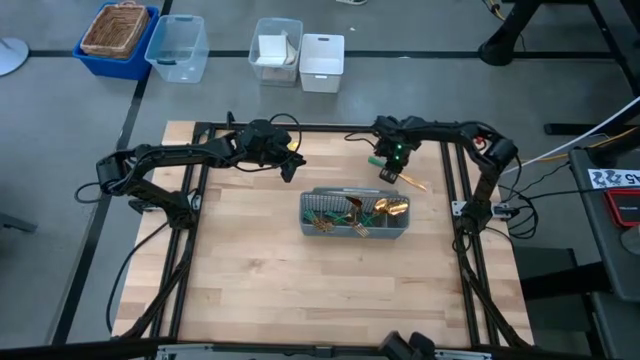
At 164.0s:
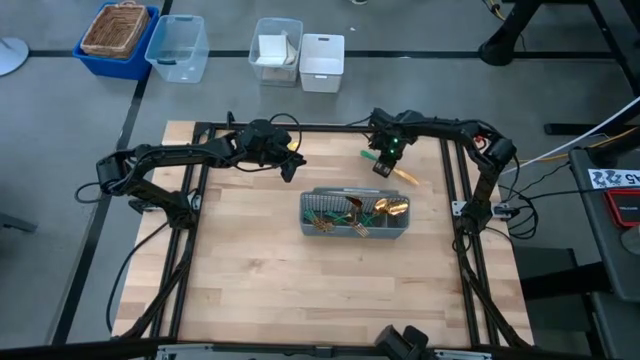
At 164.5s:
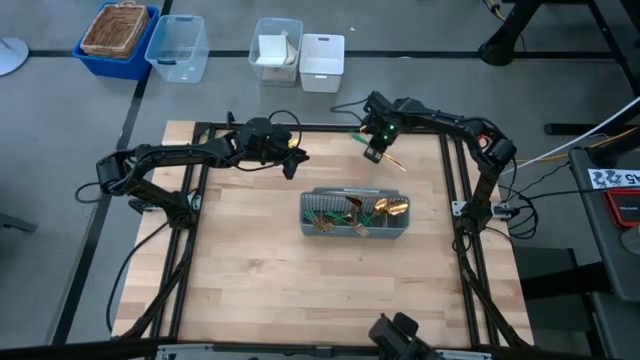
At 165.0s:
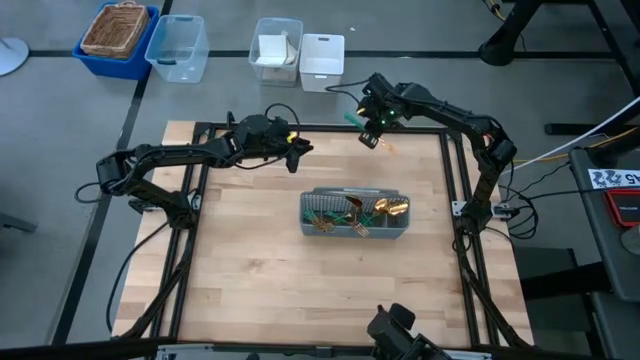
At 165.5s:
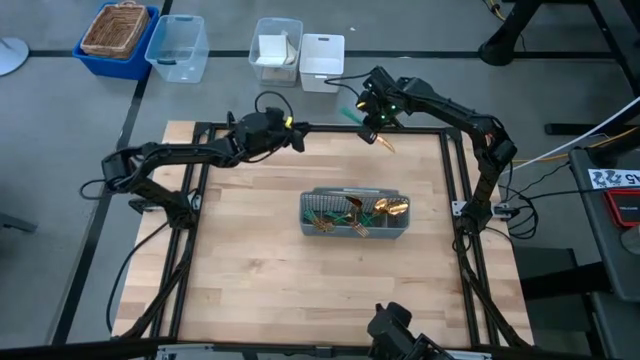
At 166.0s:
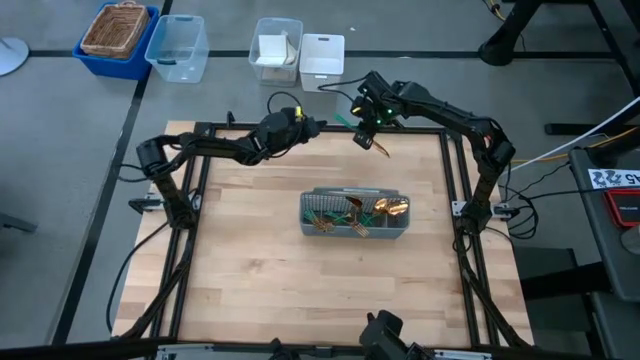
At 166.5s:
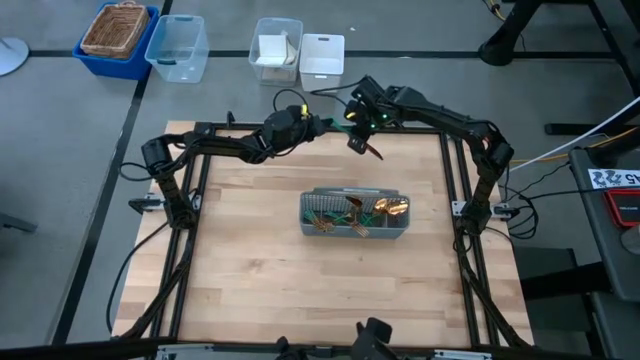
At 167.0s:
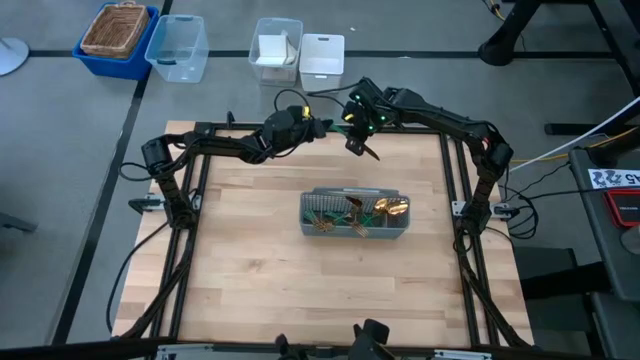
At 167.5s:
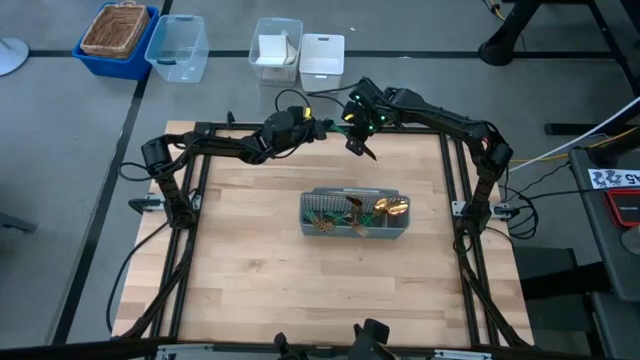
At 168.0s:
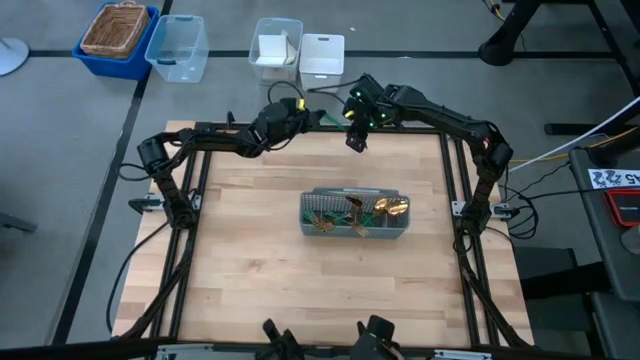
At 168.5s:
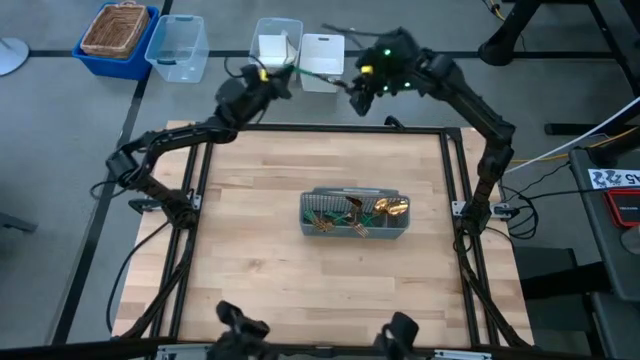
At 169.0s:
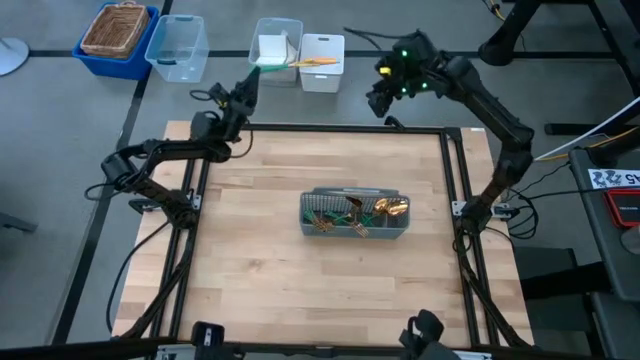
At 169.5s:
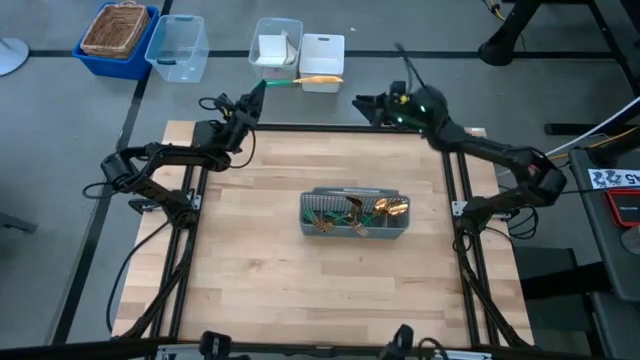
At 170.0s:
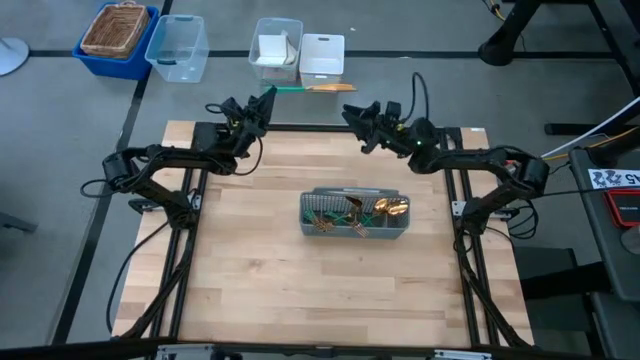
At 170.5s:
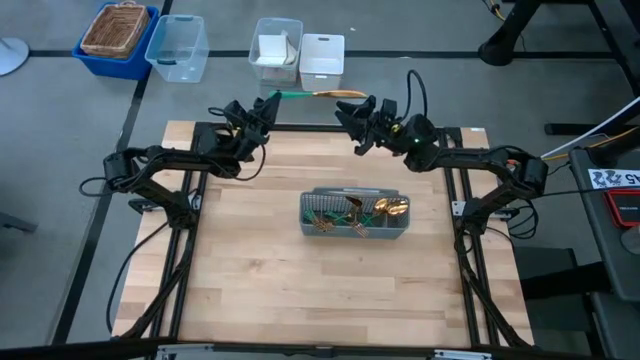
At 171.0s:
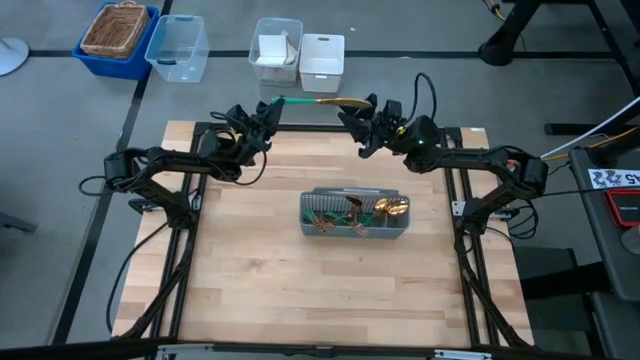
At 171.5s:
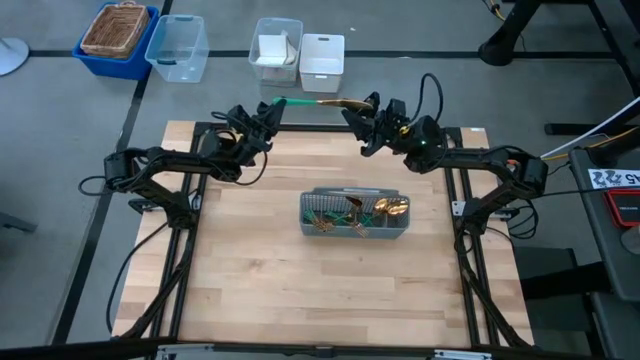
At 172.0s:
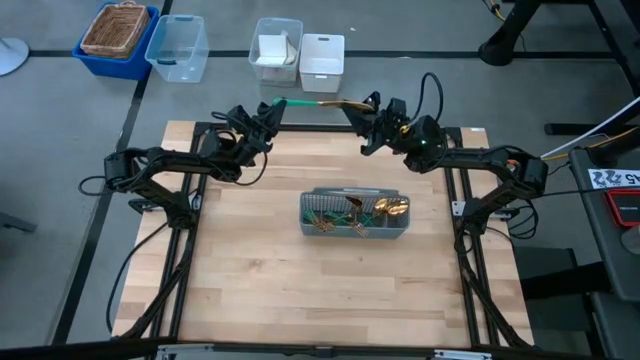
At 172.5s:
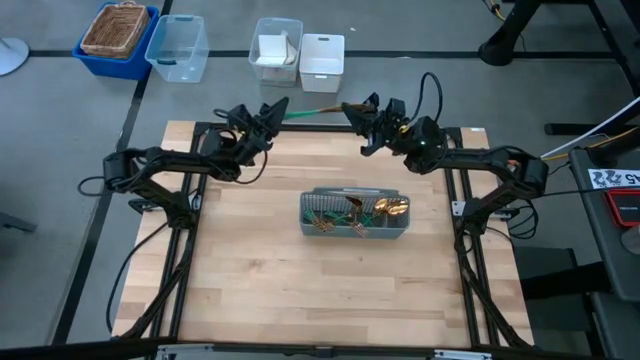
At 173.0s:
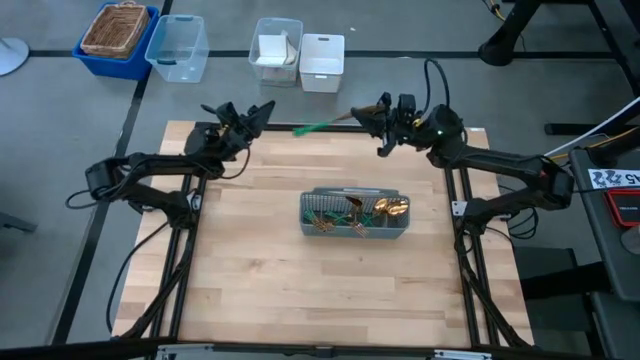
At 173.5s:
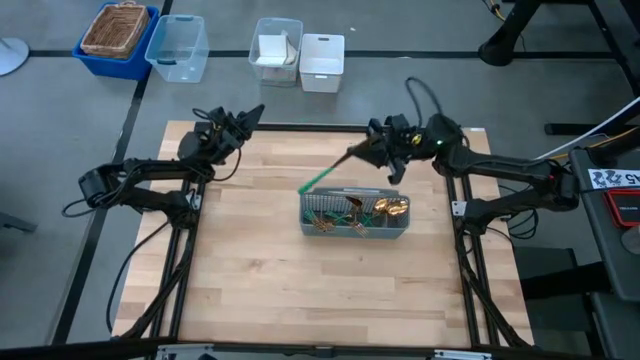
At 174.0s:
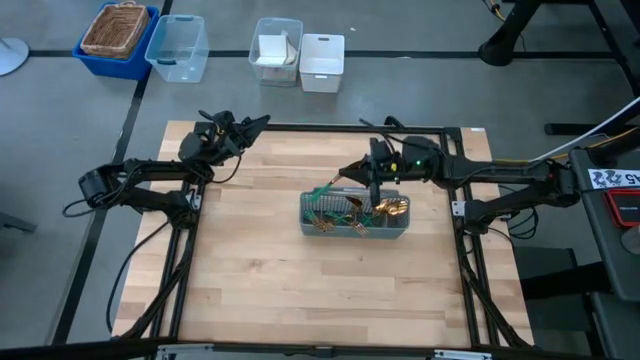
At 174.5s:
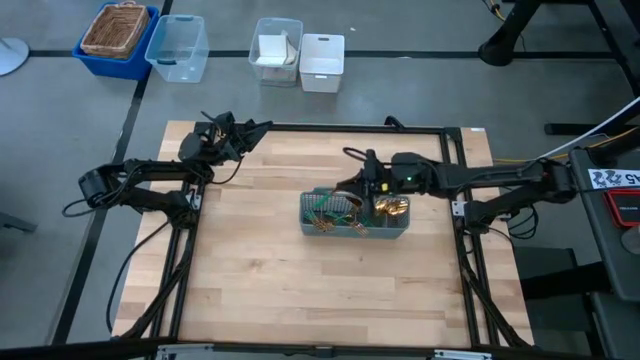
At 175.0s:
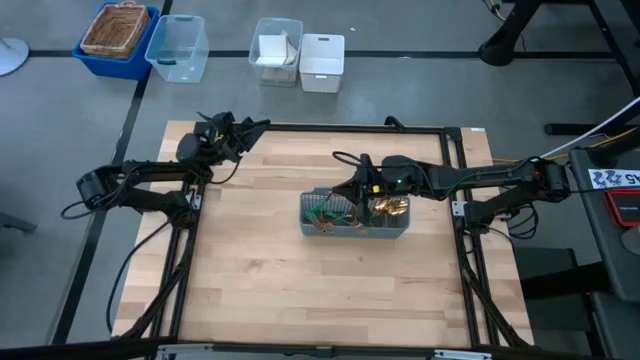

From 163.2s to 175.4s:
Task: Sort silverware
Put the green knife into the gray utensil holder

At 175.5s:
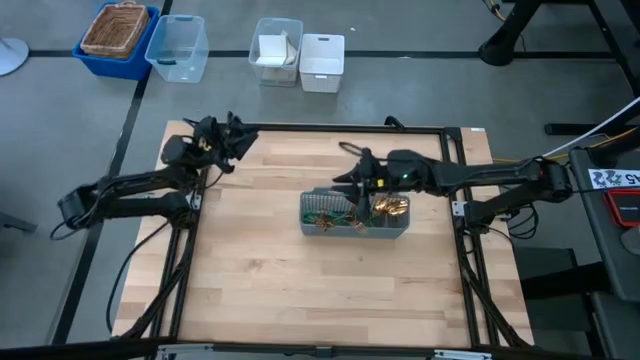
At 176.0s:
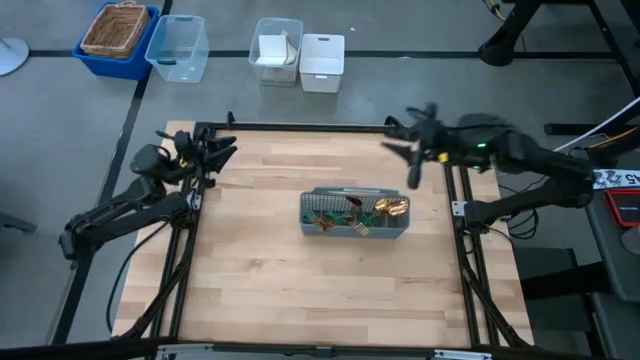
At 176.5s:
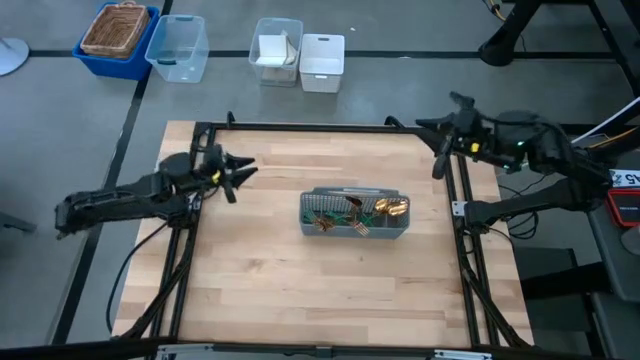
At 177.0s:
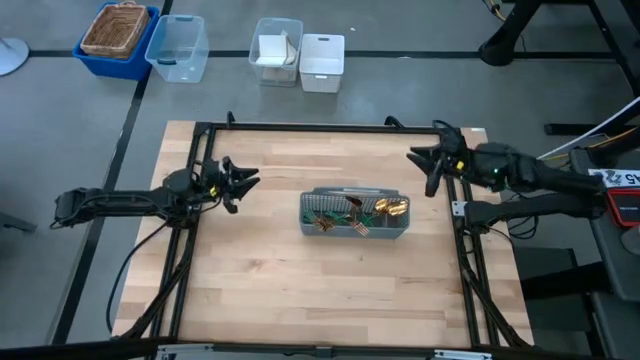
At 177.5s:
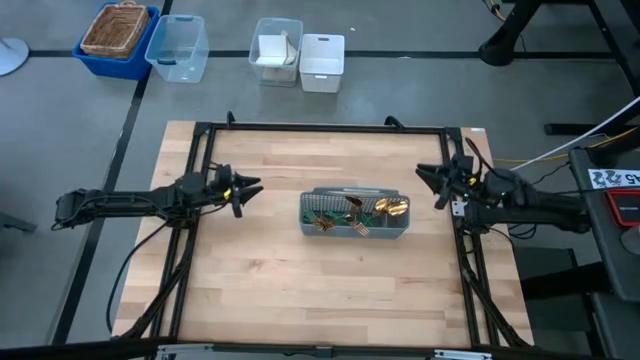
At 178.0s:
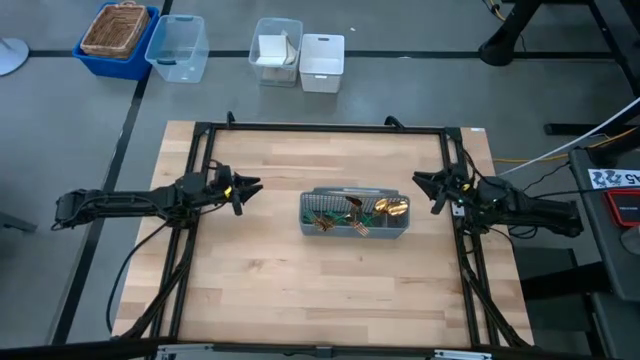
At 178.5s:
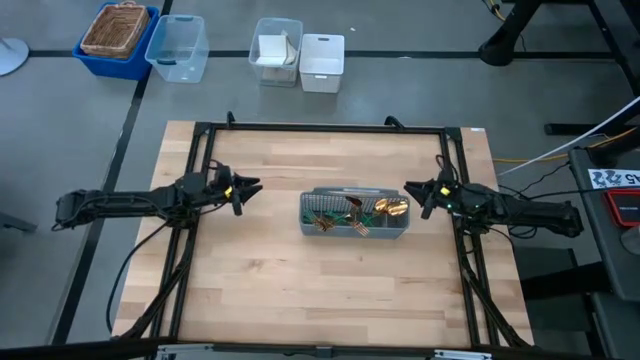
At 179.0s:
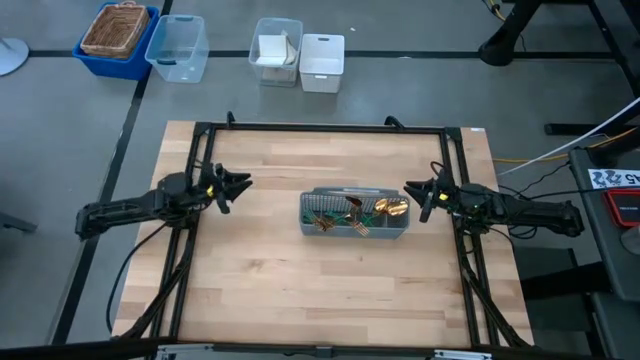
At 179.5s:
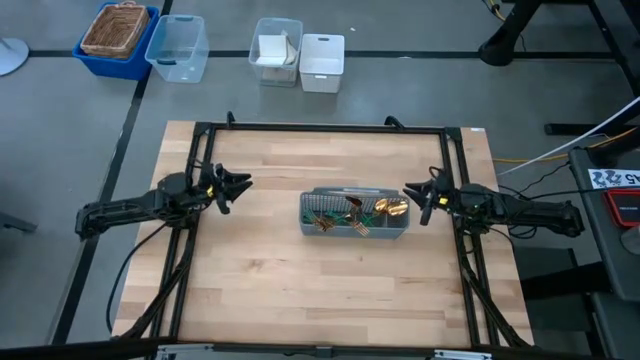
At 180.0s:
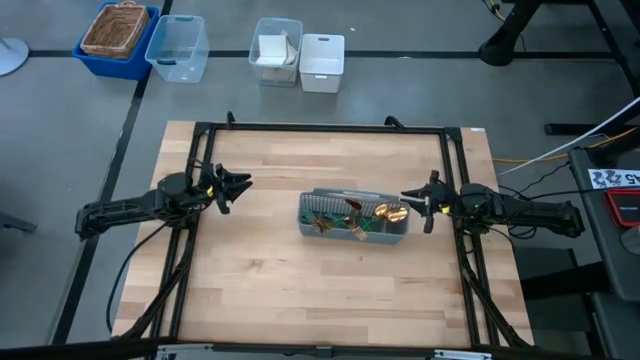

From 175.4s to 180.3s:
Adjust the gray utensil holder on the table

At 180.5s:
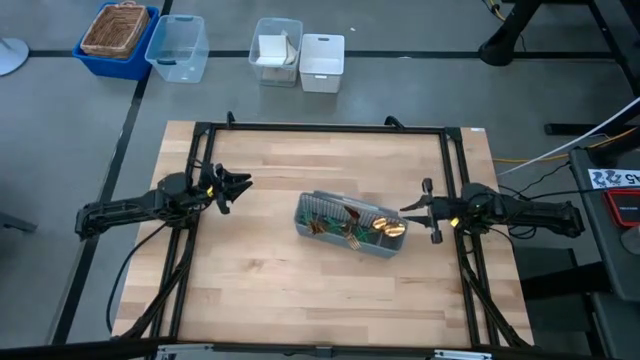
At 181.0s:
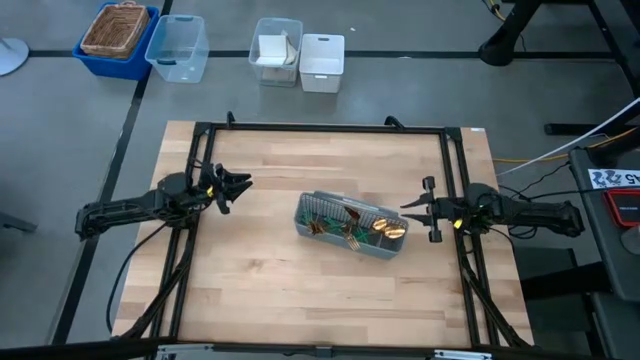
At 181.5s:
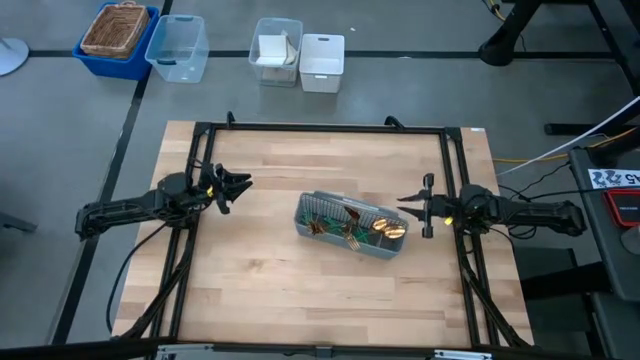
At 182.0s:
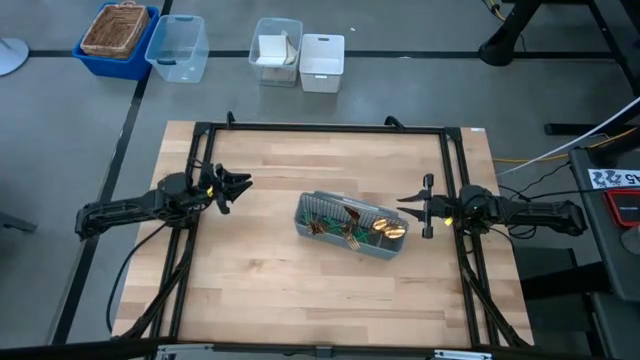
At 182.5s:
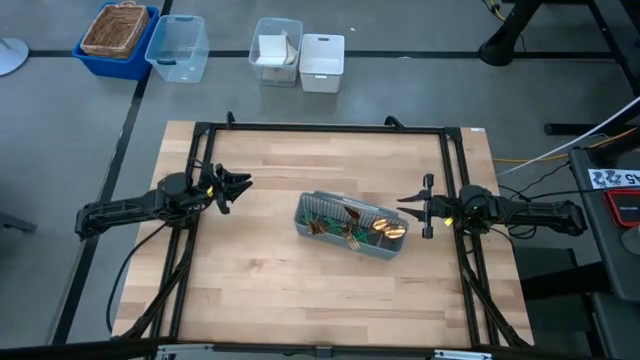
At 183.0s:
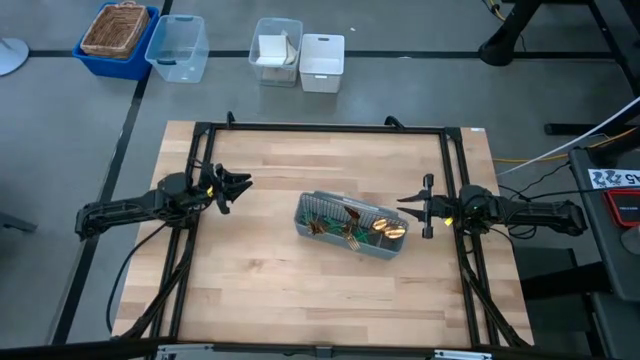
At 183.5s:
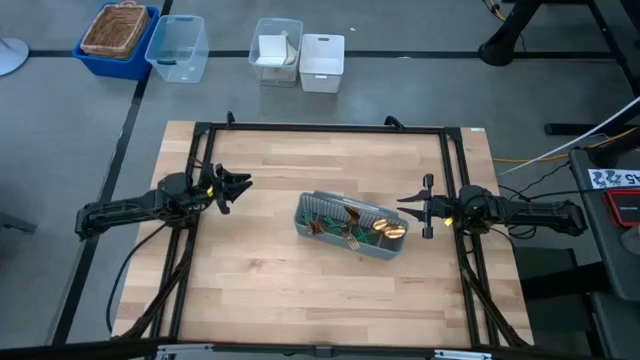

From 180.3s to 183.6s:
Return to Home Position

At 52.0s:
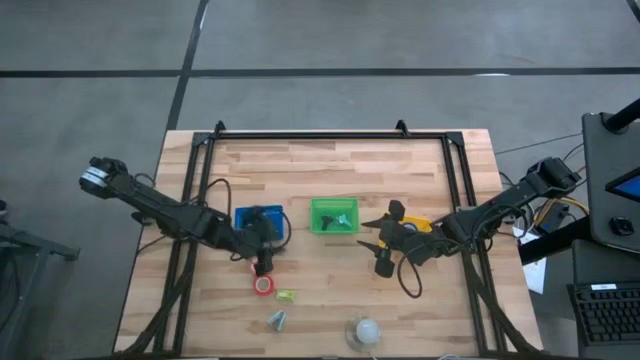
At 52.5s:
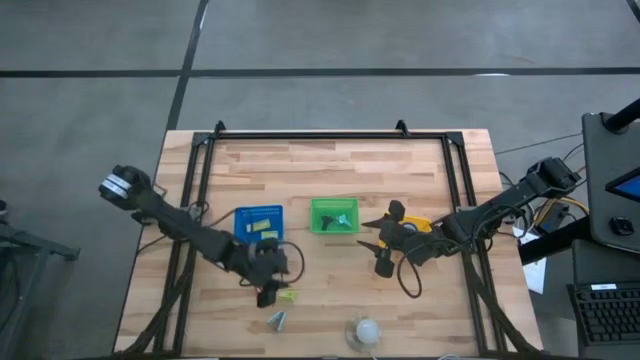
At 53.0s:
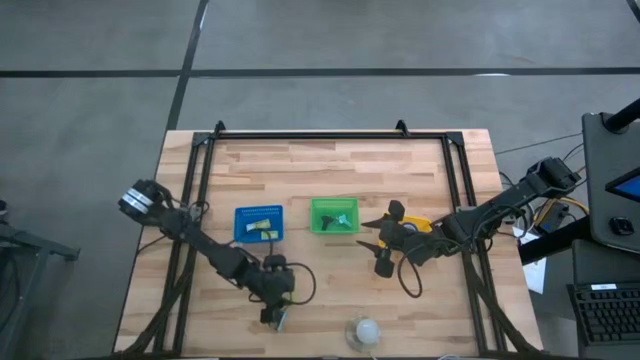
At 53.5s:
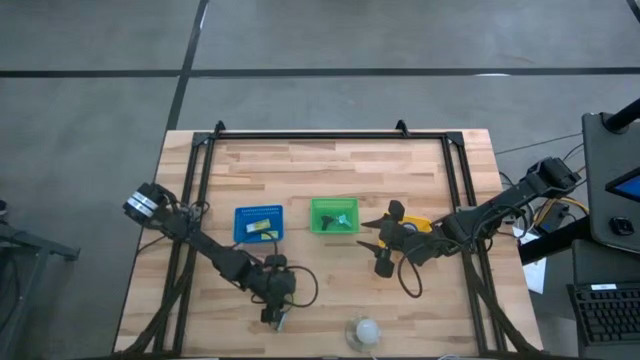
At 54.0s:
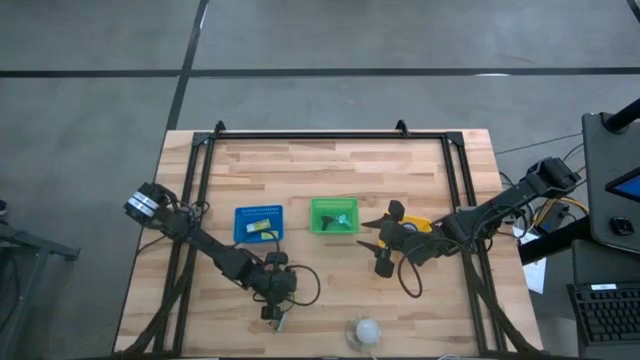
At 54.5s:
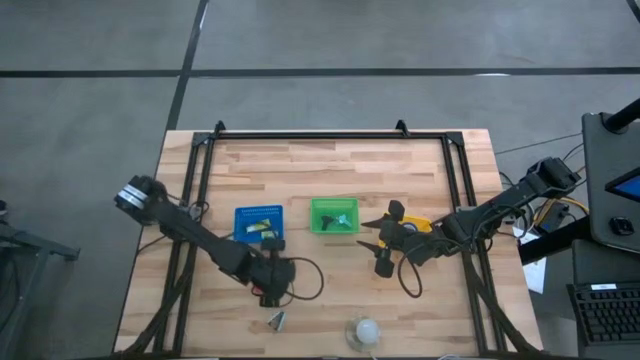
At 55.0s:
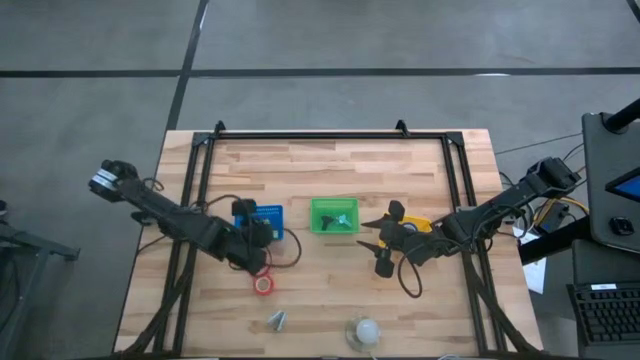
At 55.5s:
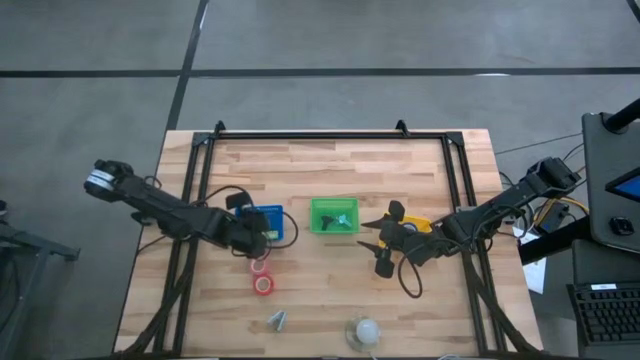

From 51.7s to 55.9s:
Task: Pick and place Stapler, Stapler remover, tape
Put the staple pin box into the blue bin
